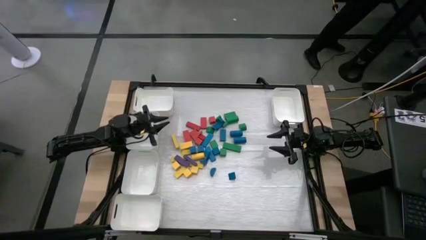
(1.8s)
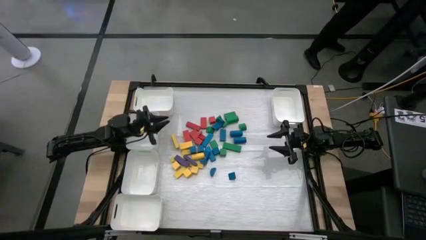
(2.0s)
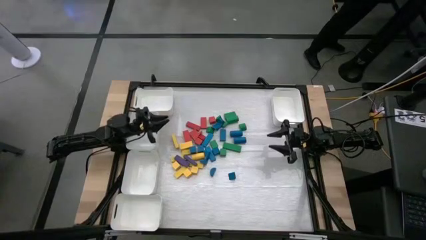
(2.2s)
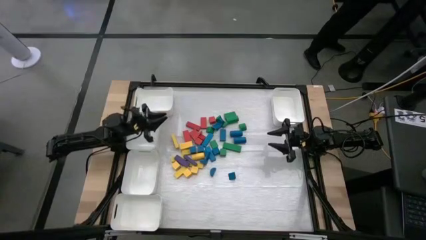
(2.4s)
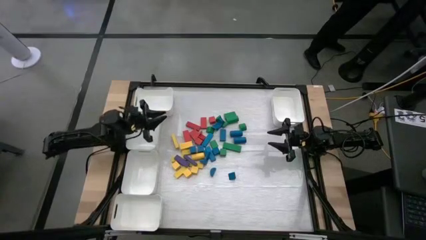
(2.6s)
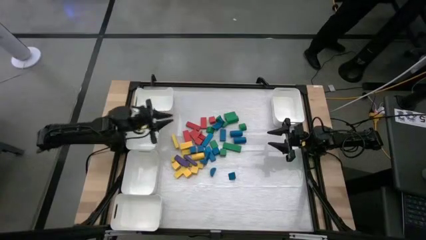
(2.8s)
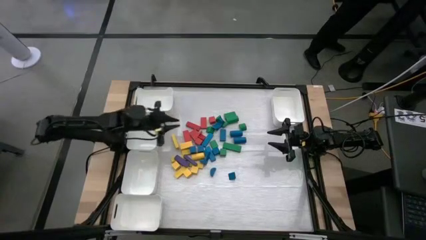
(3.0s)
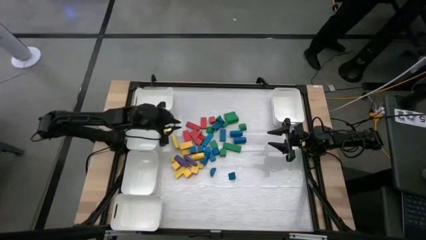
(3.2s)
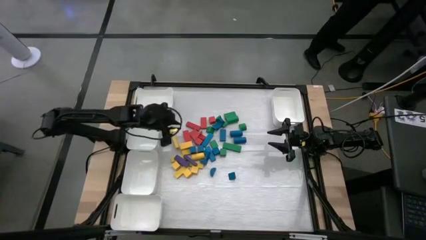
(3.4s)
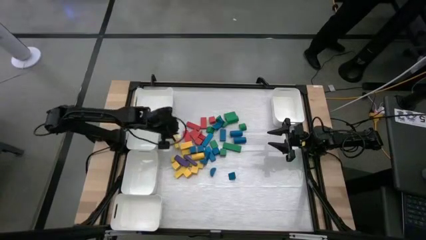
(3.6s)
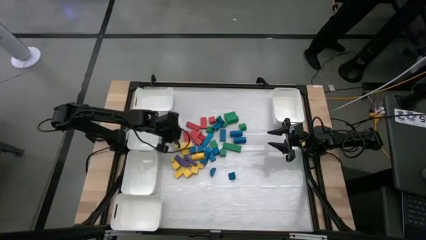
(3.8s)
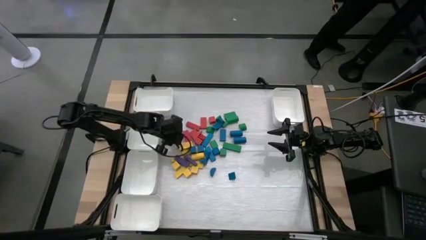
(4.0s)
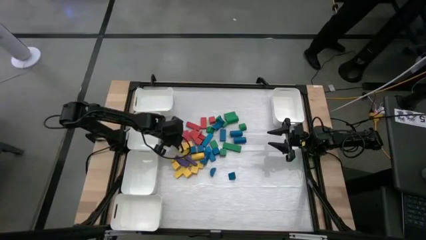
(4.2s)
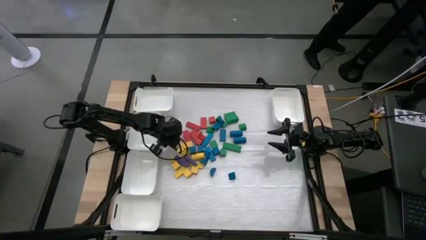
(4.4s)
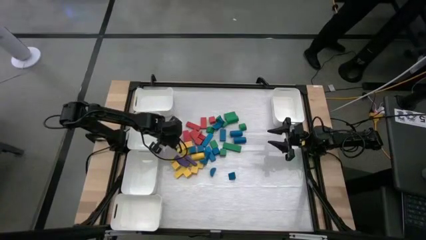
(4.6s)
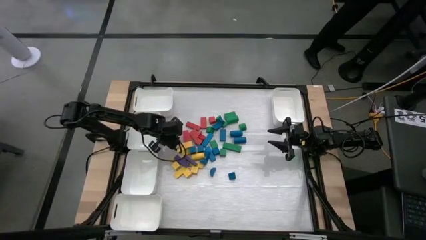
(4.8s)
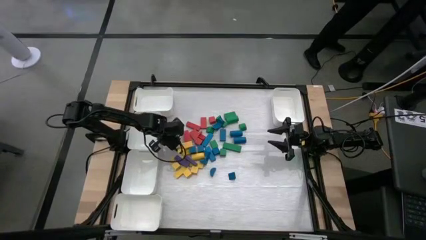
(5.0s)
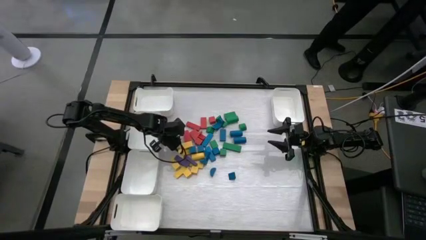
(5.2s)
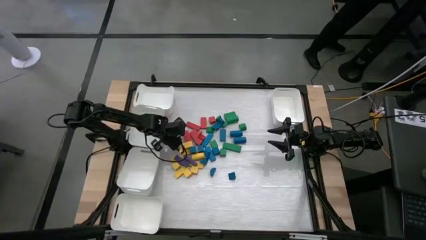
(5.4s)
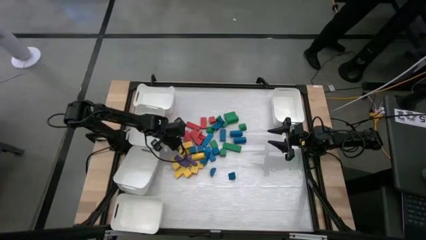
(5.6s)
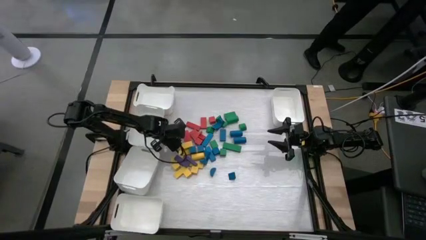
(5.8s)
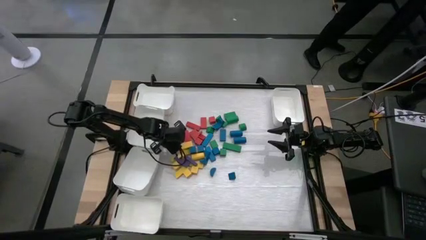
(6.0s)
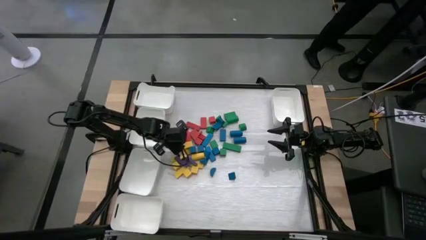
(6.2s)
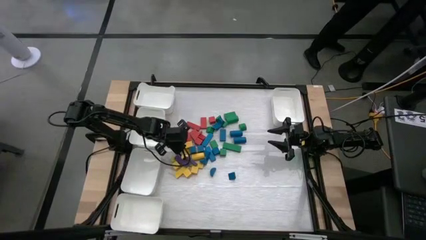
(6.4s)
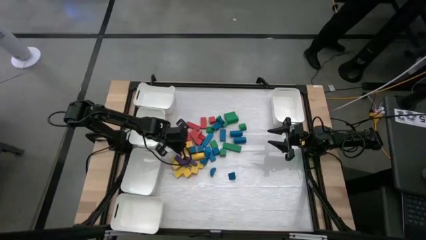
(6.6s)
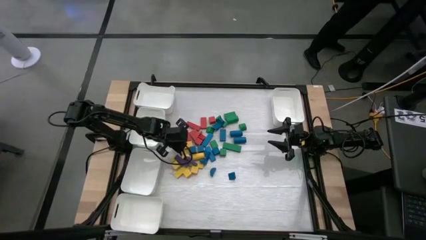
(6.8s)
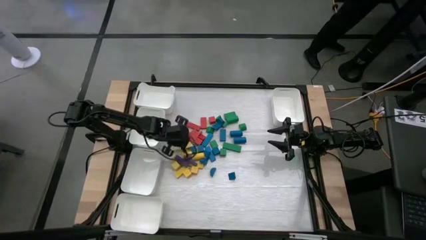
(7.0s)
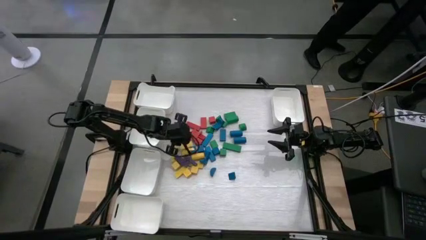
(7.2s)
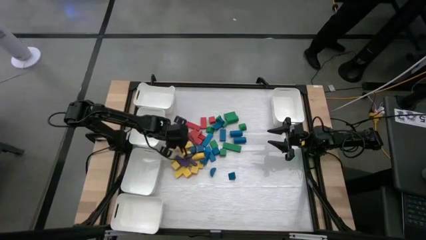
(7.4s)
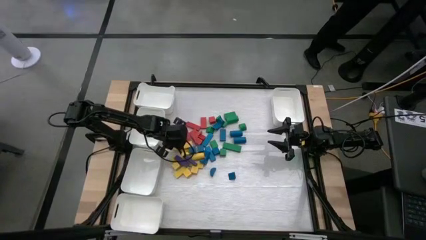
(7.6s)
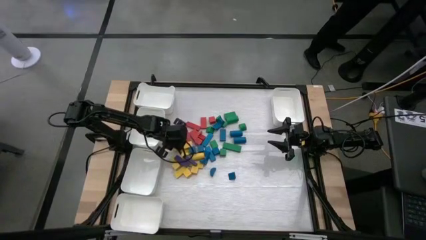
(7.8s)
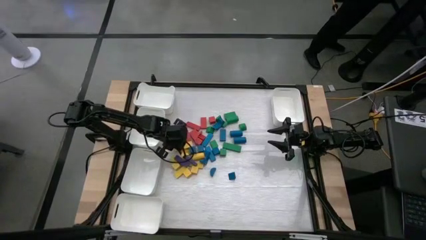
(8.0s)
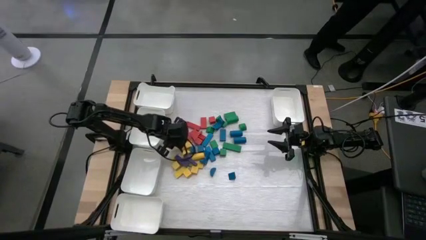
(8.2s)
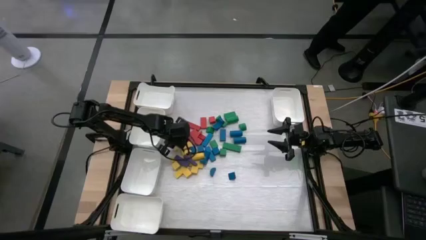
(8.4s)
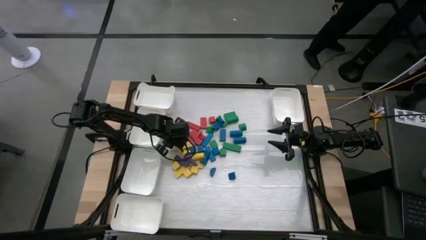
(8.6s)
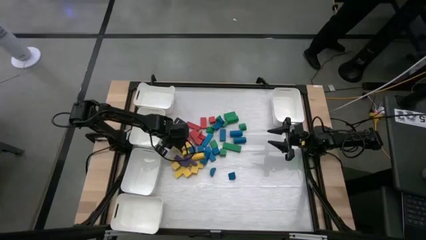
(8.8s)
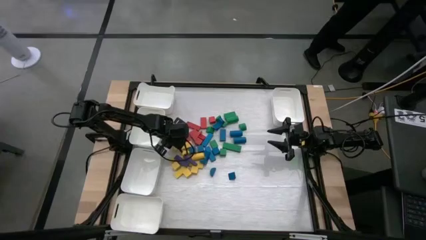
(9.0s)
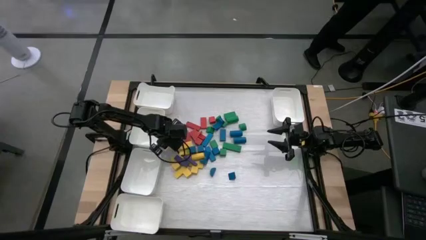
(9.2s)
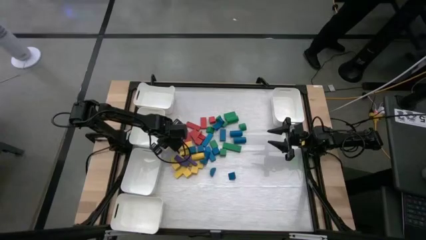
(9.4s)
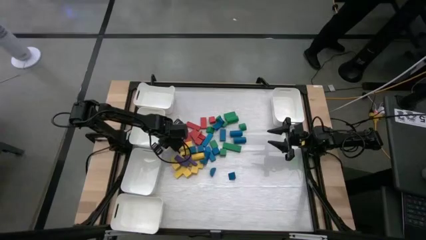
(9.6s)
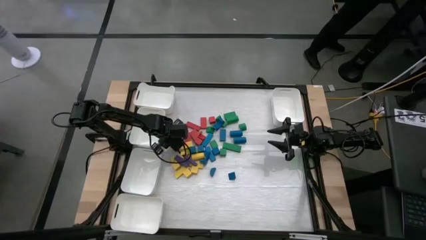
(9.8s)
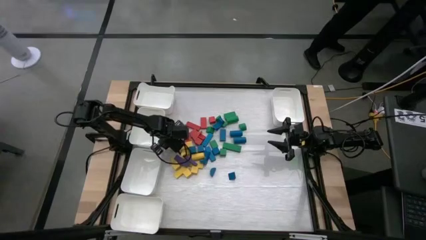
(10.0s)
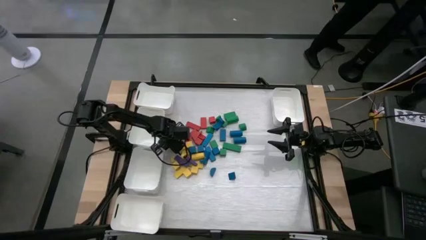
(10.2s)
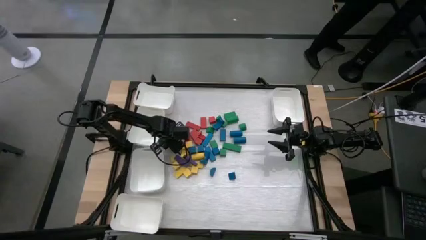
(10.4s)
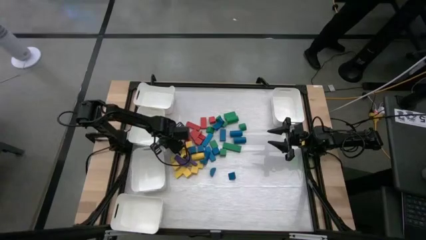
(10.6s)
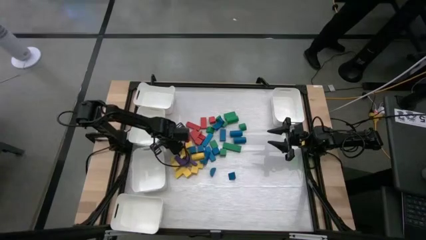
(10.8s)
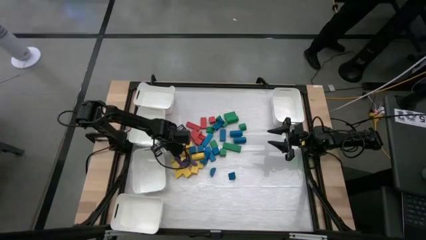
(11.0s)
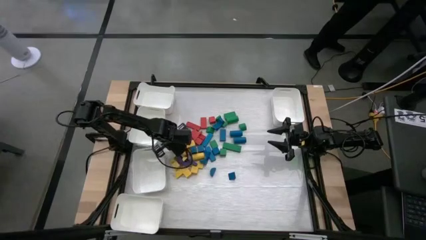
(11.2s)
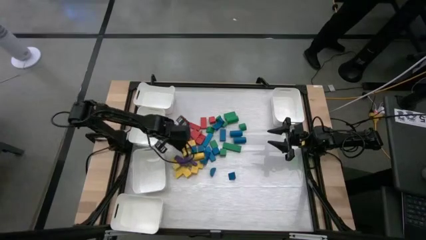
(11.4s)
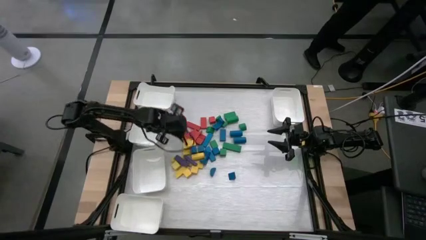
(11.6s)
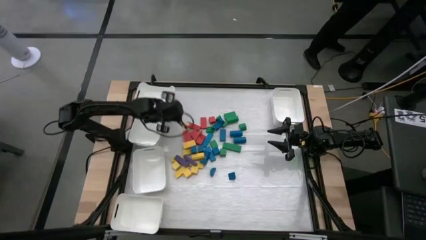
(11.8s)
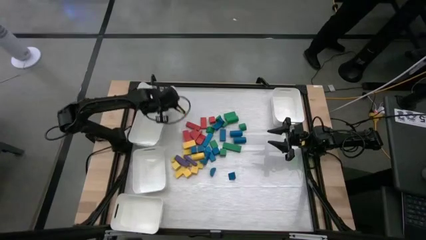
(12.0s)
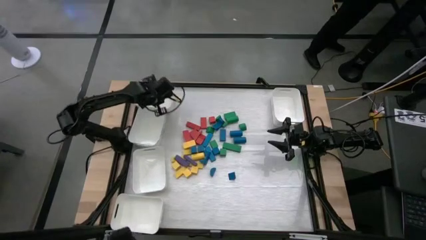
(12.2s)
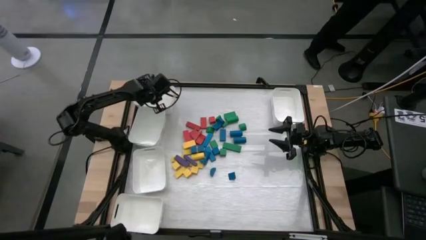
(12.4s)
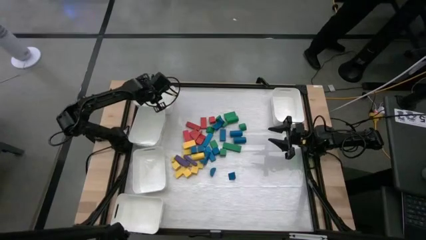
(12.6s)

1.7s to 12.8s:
Task: Sort blocks
Put the yellow wooden block into the top left white bin

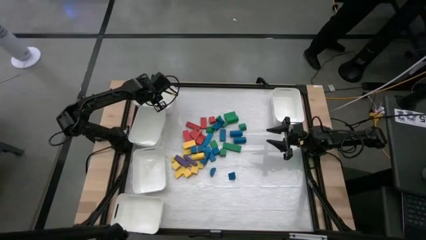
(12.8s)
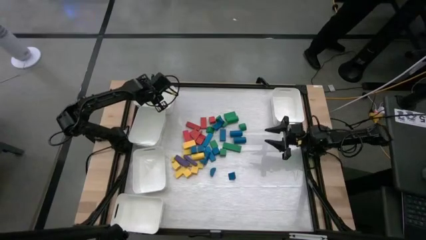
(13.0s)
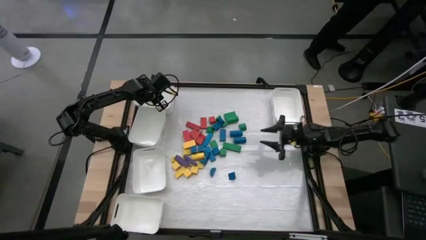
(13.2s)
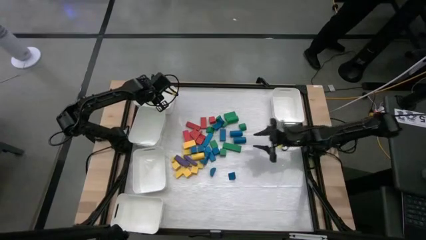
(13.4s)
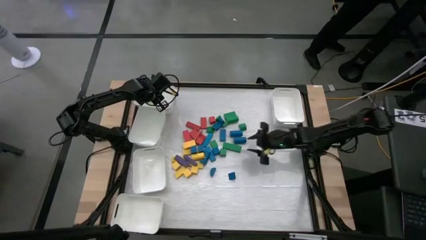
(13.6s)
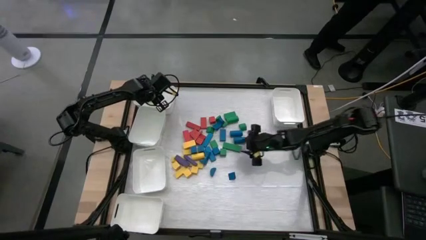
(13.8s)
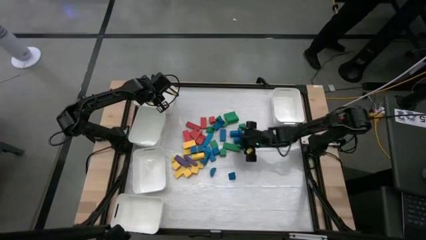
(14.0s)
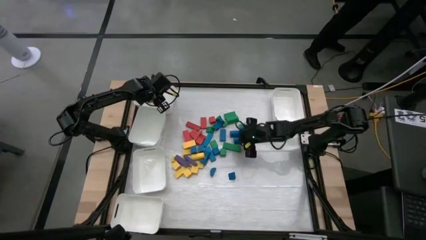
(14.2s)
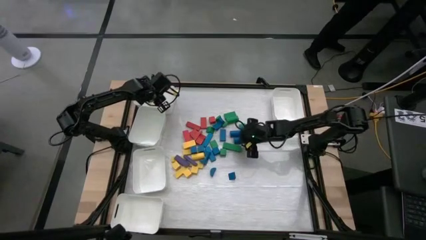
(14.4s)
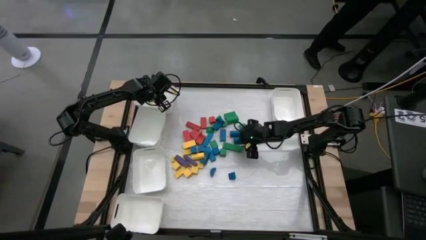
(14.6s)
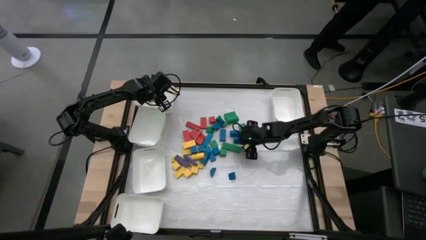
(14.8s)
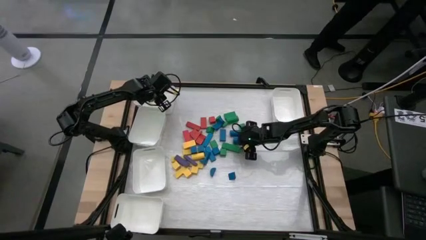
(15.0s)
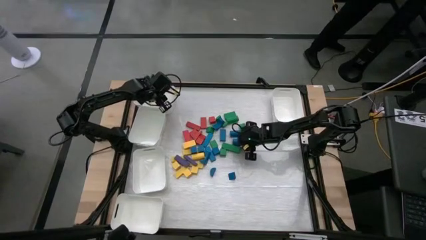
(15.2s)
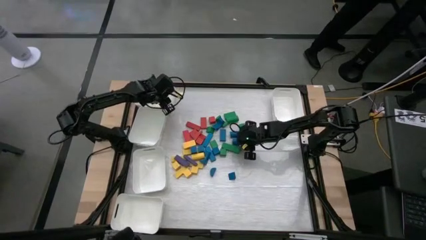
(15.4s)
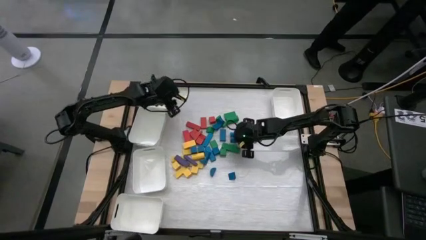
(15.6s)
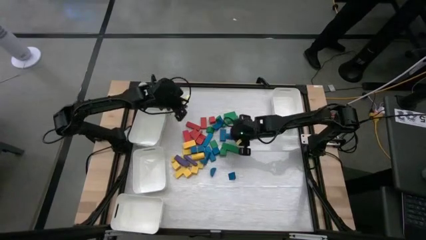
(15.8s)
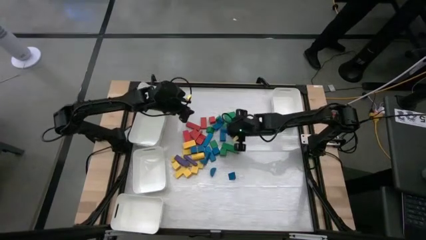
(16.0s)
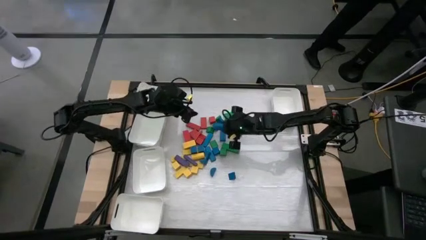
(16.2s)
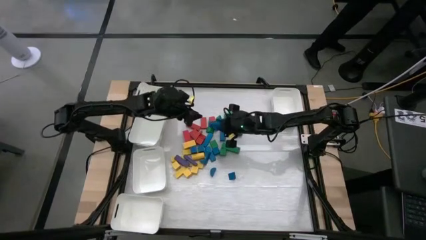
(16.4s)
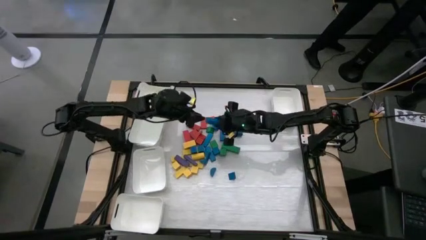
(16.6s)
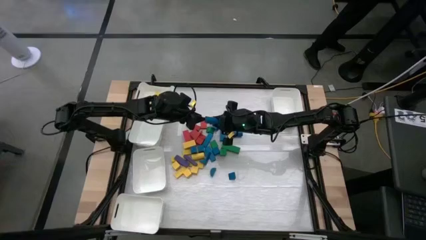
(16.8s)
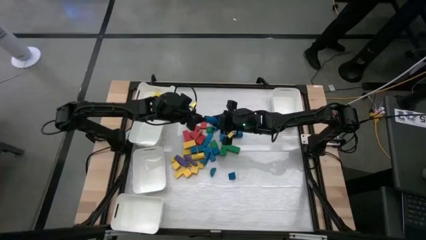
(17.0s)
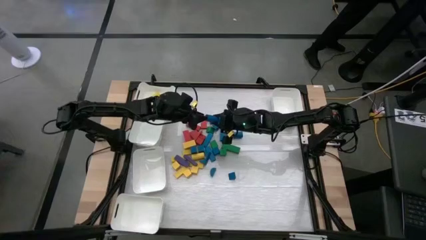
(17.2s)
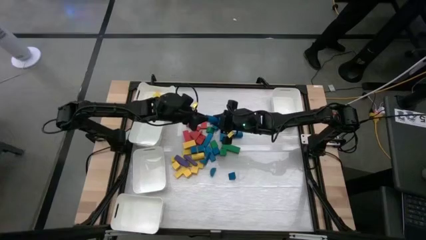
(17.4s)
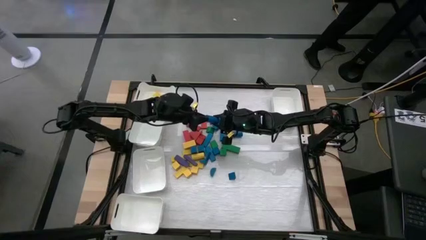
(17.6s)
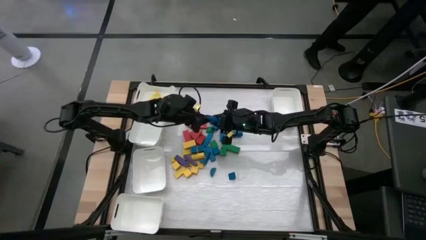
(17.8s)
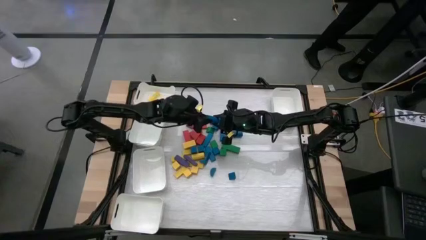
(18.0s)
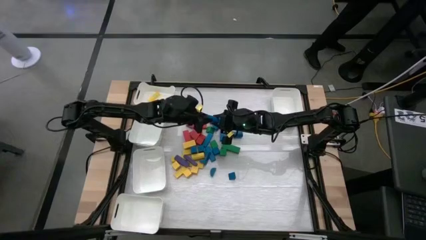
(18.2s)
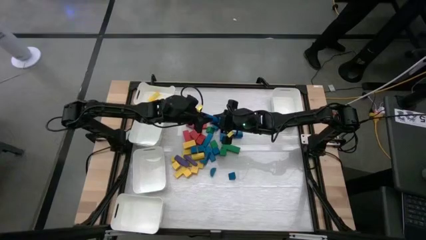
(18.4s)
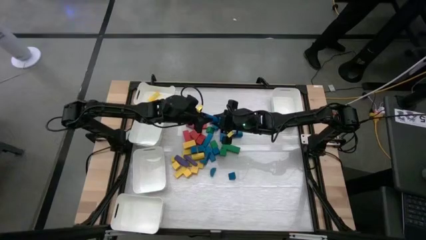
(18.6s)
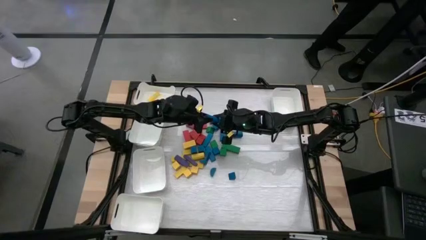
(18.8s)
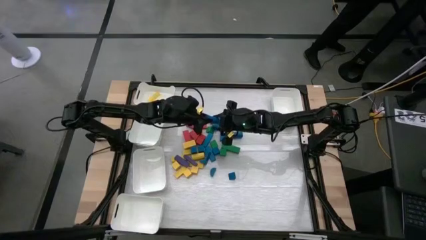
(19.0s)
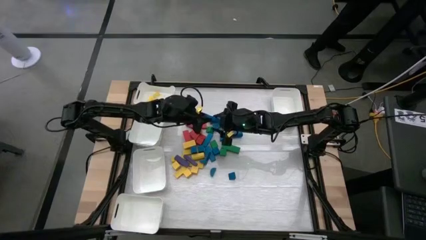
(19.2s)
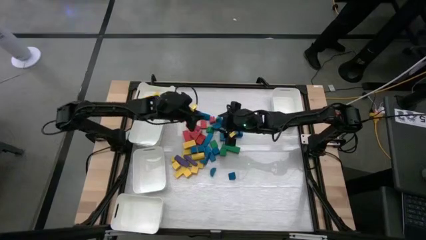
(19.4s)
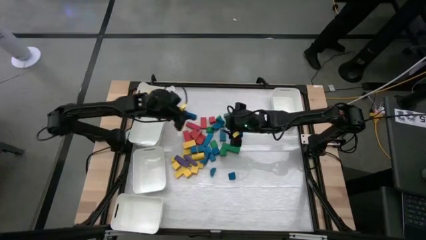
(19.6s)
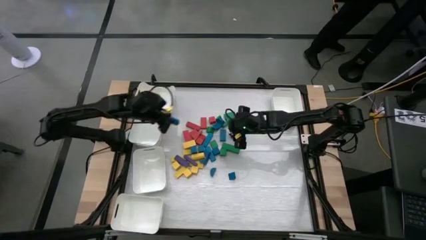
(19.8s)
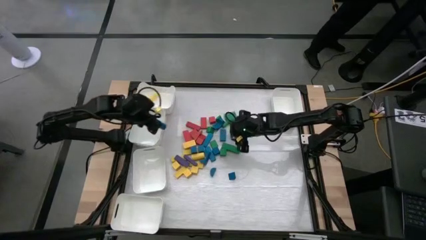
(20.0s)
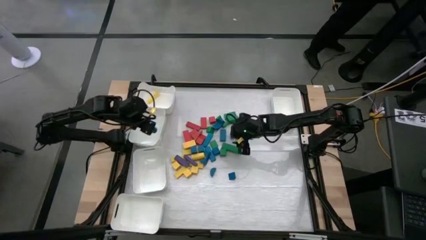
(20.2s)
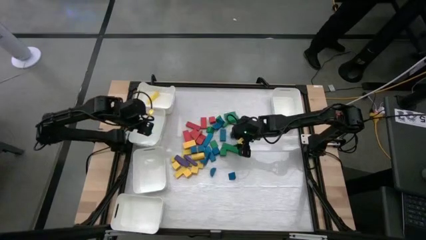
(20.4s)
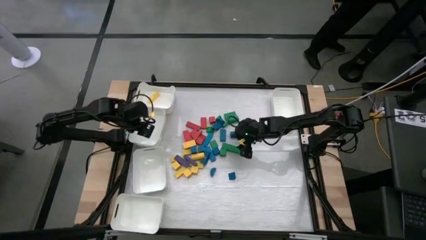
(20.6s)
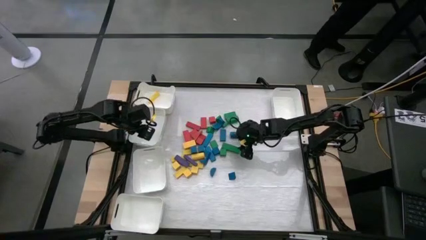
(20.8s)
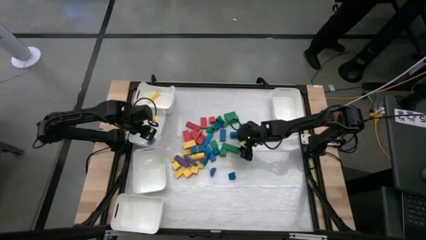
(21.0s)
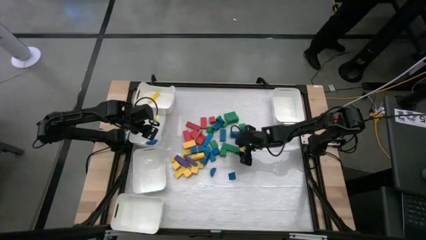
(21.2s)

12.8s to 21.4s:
Put the blue wooden block into the top middle left white bin
